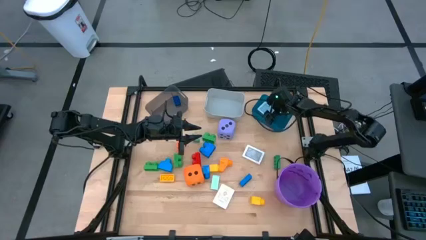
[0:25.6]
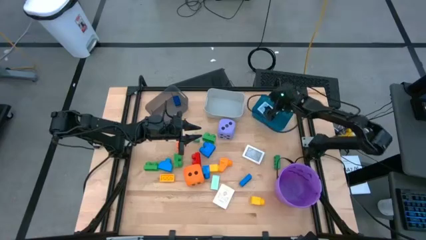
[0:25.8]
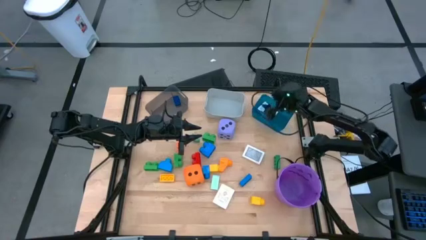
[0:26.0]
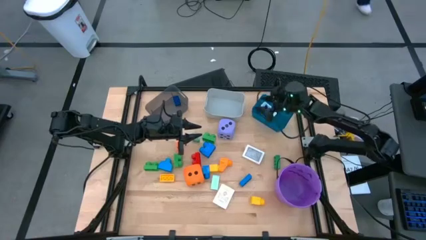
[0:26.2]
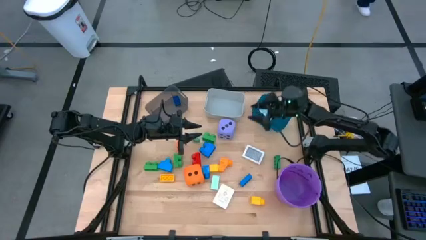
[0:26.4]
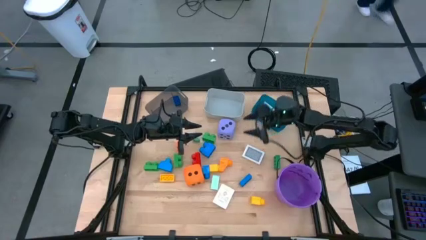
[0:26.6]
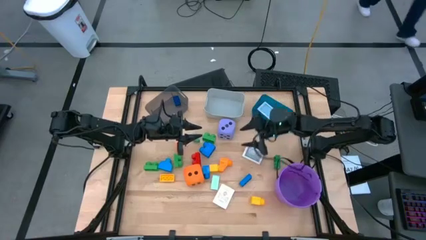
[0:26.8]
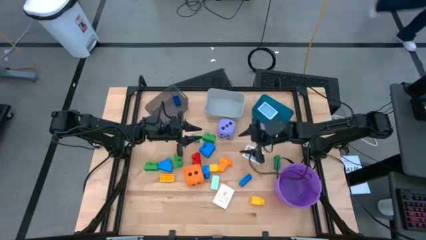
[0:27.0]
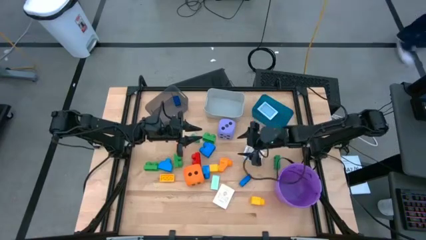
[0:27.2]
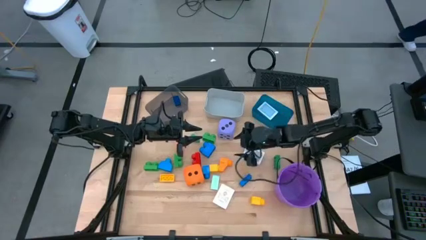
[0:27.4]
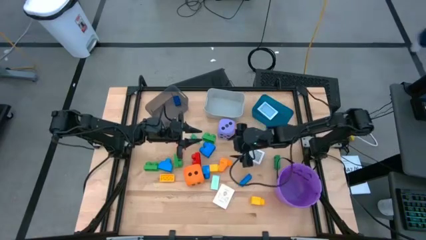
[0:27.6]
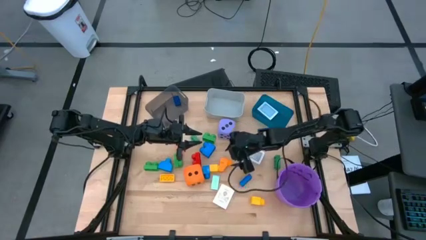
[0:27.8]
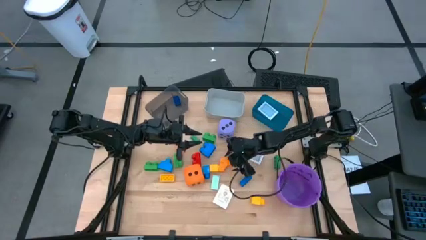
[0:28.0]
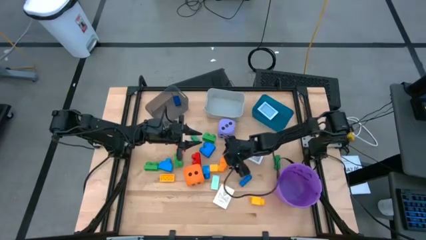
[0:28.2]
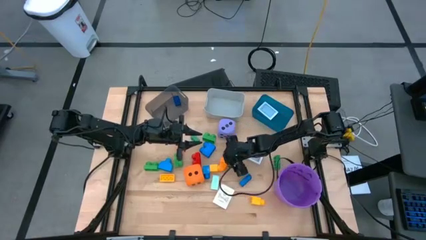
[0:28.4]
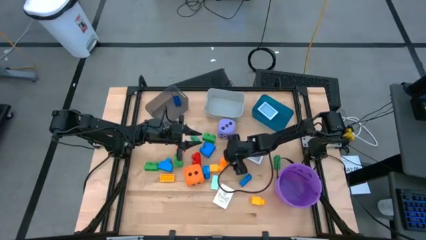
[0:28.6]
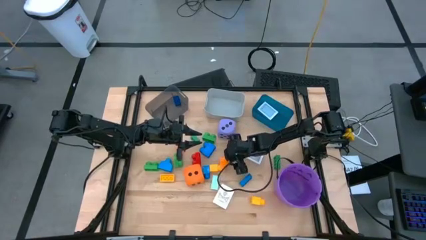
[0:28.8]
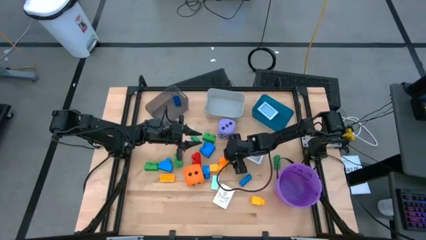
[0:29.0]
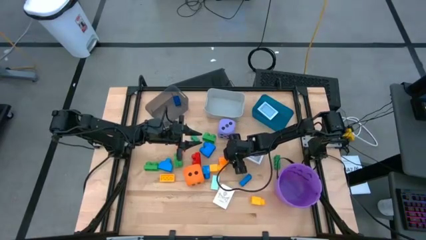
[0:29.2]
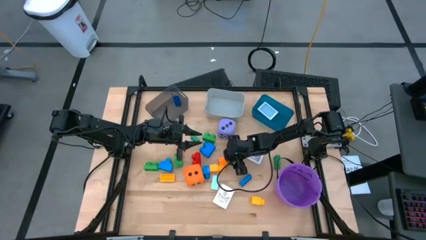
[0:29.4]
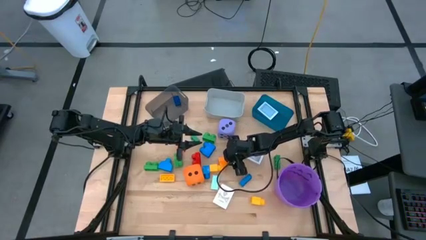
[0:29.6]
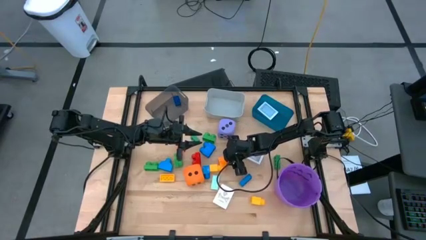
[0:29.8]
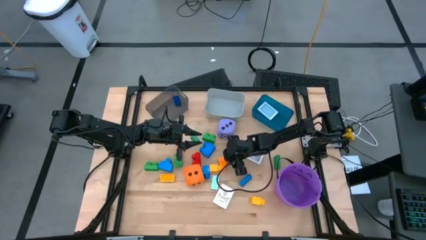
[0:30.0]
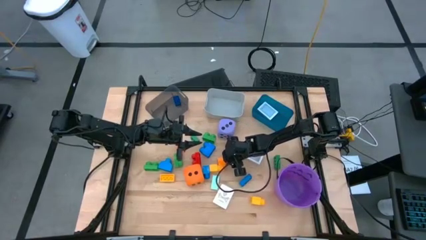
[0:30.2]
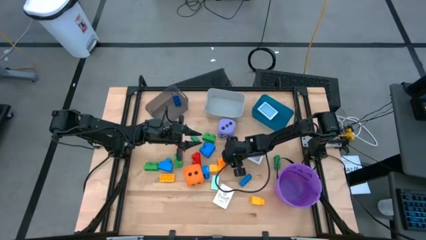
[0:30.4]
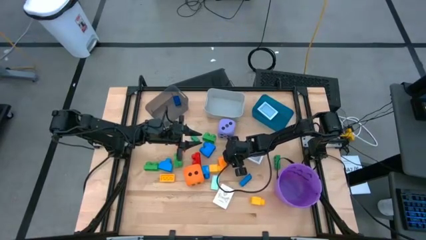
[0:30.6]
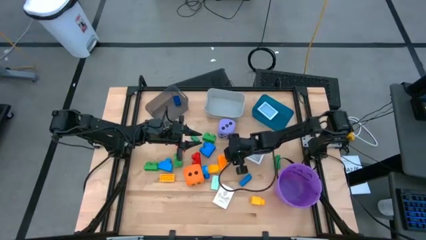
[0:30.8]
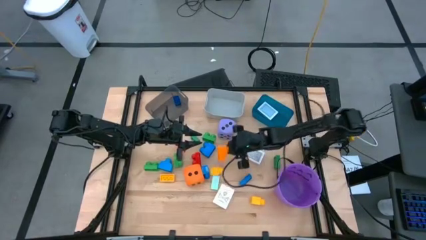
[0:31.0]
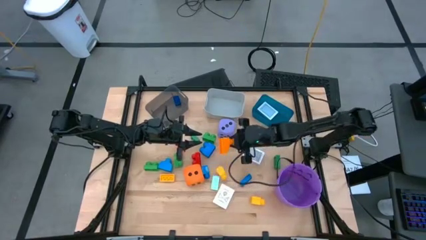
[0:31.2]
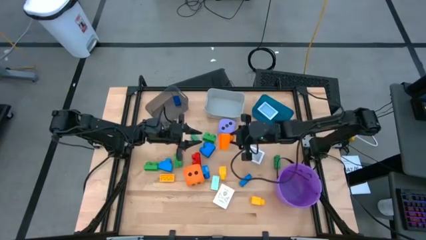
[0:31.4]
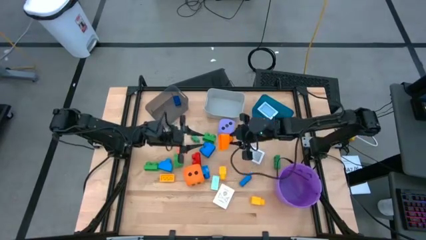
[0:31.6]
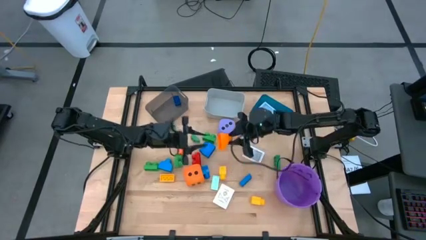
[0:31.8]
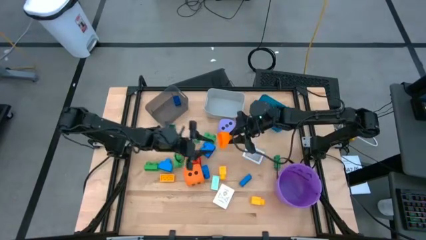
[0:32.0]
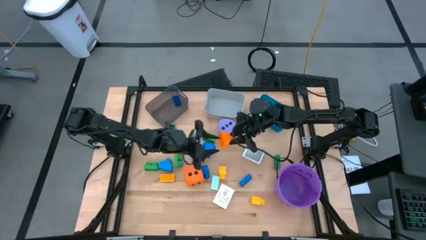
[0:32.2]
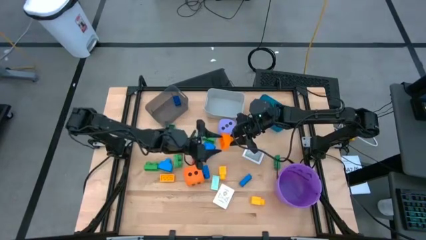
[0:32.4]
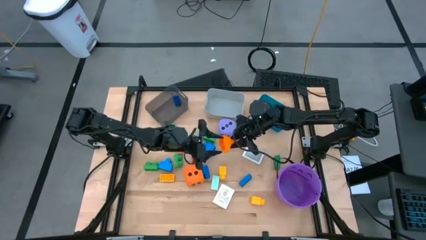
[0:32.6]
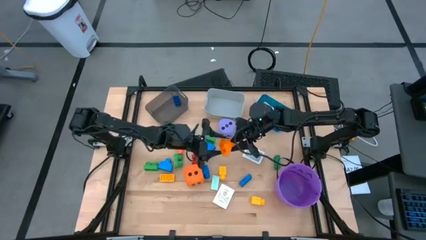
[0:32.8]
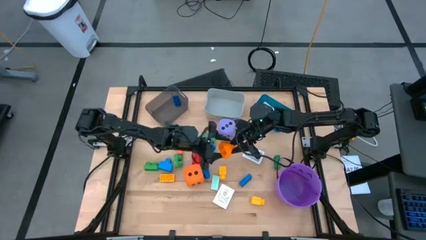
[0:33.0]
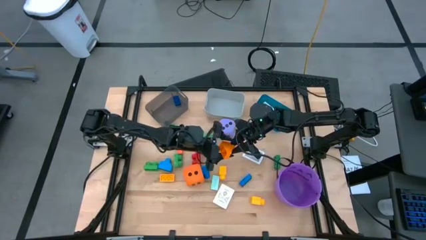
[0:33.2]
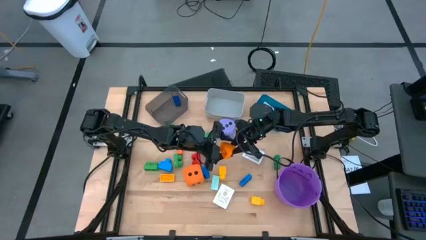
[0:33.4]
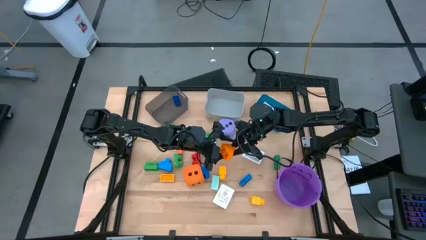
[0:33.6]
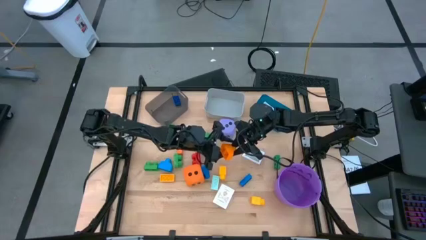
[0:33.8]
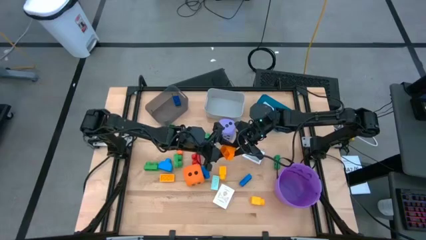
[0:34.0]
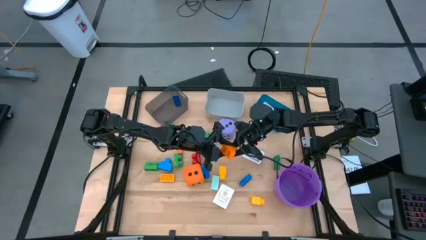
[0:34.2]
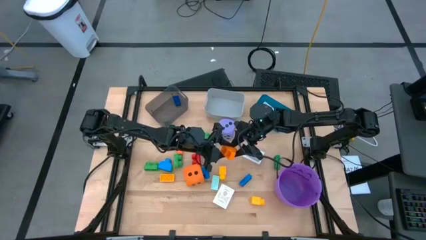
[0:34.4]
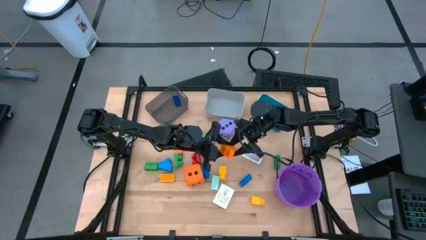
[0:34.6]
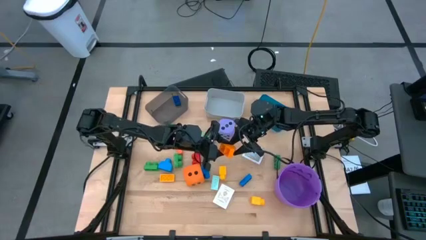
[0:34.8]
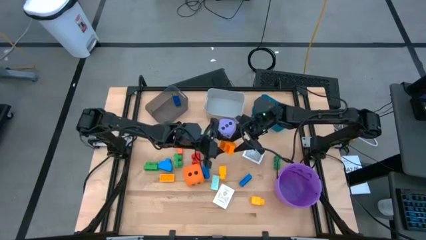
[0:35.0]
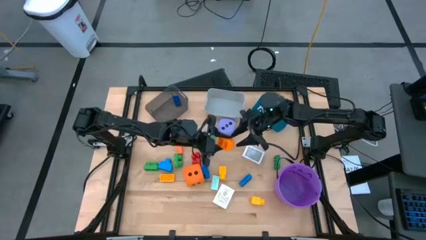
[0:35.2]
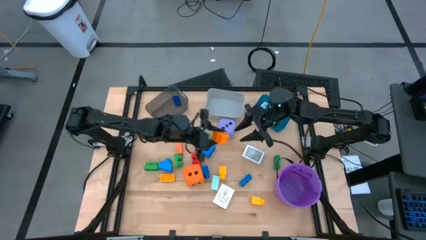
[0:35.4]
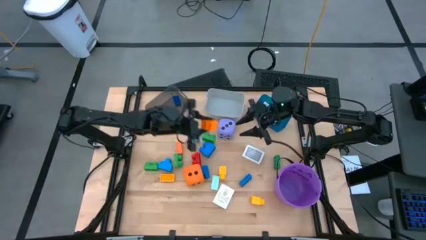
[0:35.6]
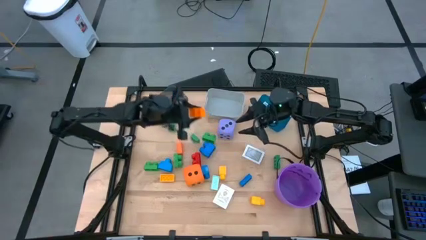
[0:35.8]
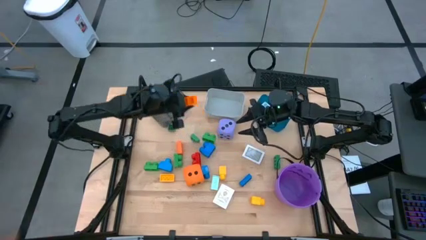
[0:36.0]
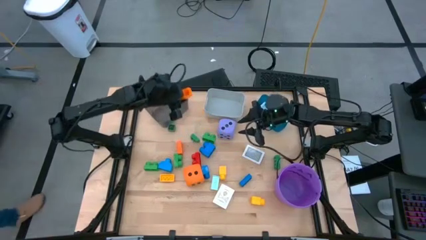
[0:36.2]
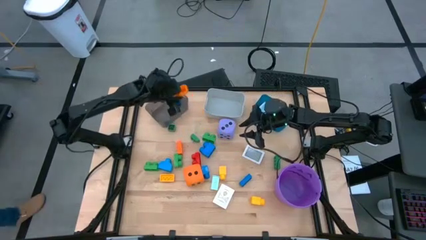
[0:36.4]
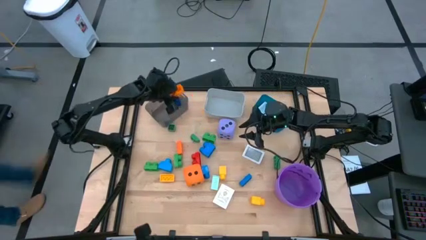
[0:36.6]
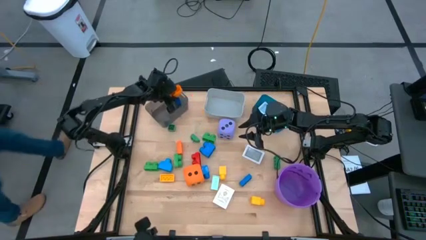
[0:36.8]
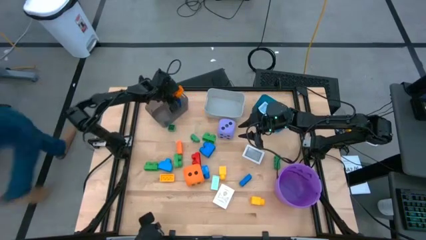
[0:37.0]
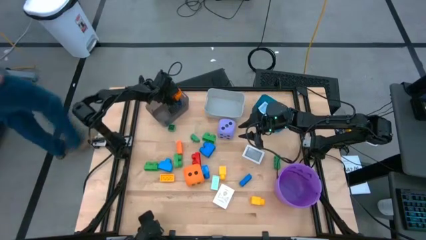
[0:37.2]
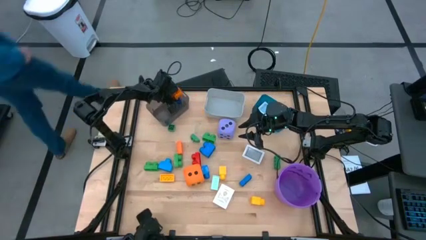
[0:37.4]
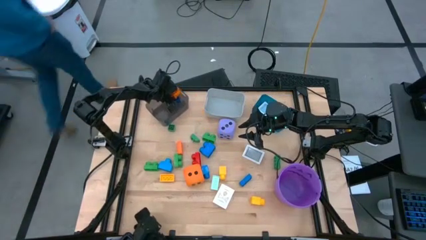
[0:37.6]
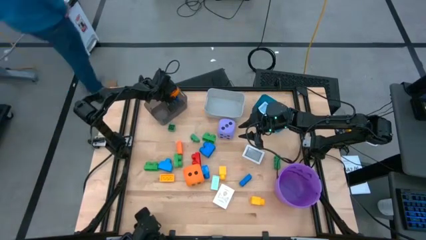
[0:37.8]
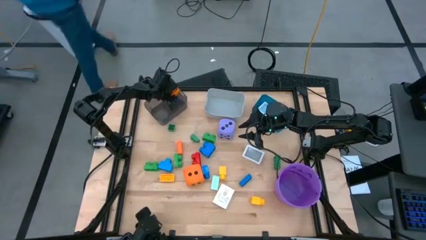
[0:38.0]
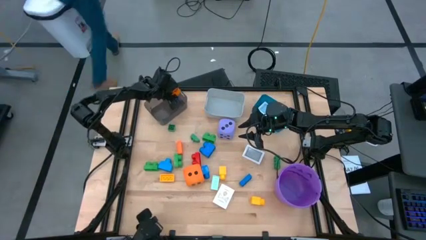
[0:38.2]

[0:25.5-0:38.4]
Task: Pick & Place Toys
Put the orange gamepiece into the black bin
